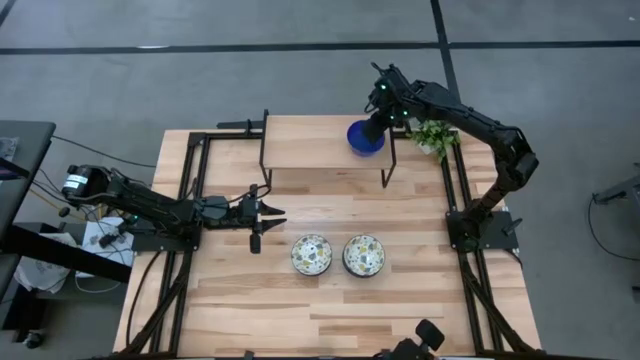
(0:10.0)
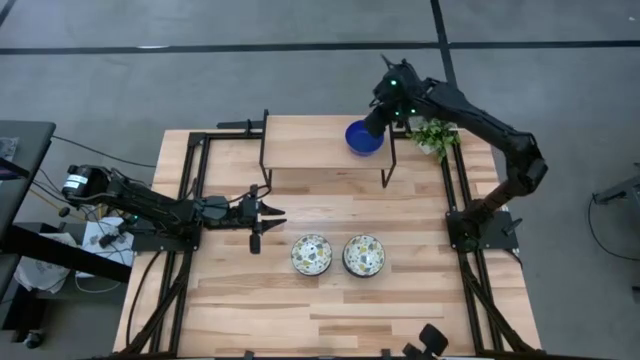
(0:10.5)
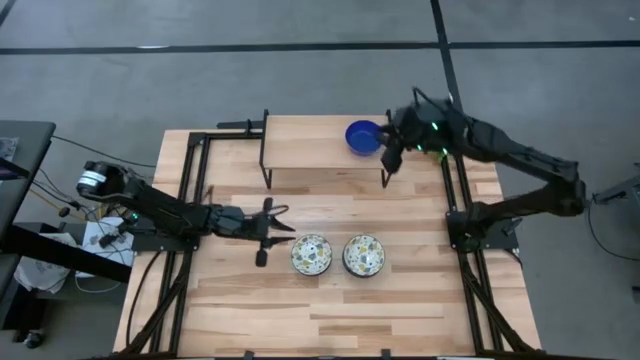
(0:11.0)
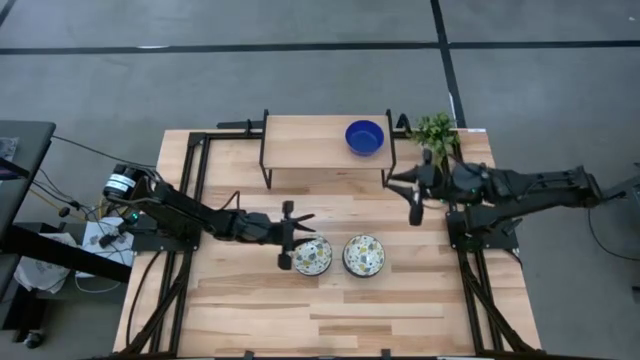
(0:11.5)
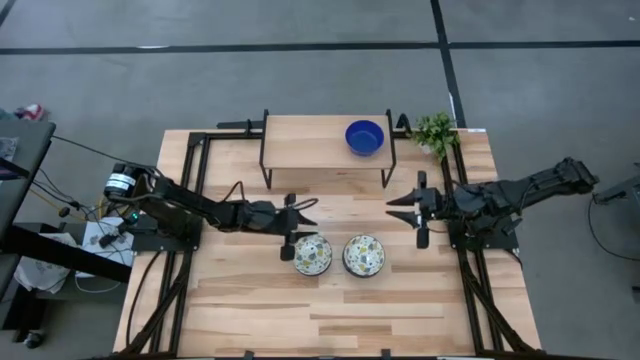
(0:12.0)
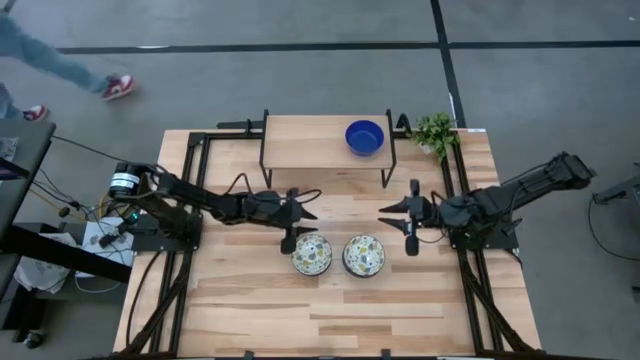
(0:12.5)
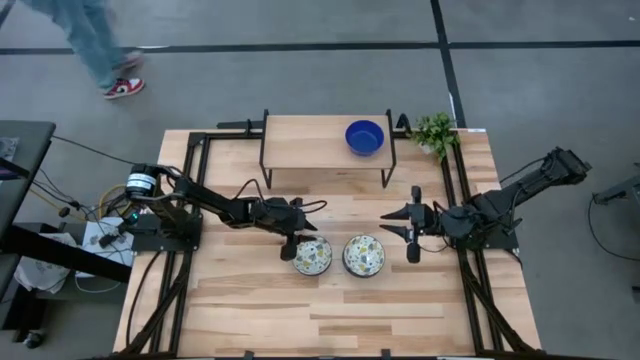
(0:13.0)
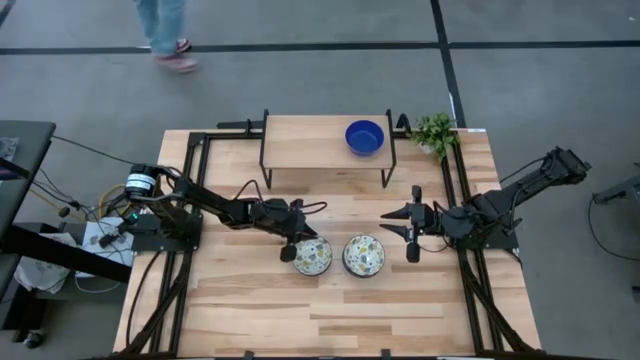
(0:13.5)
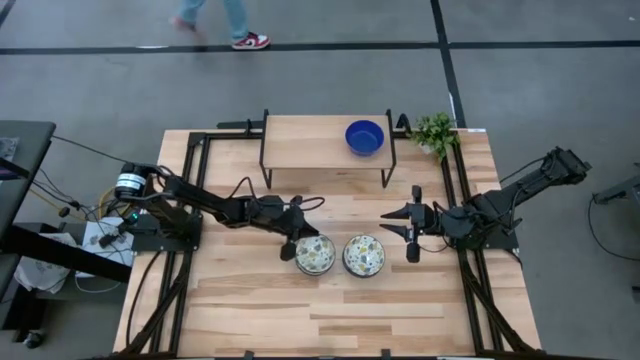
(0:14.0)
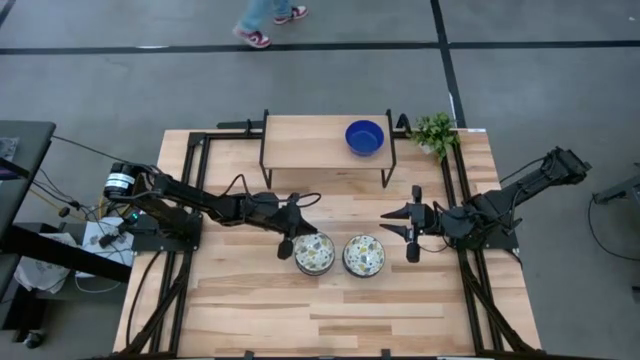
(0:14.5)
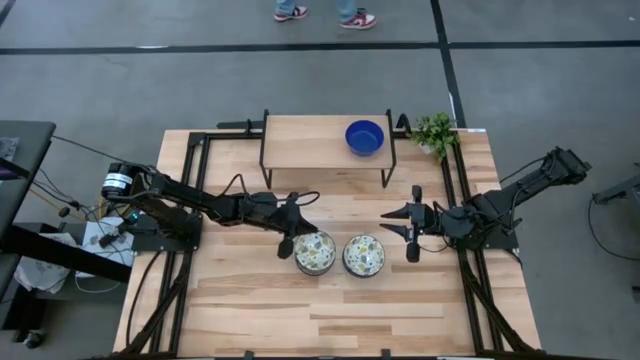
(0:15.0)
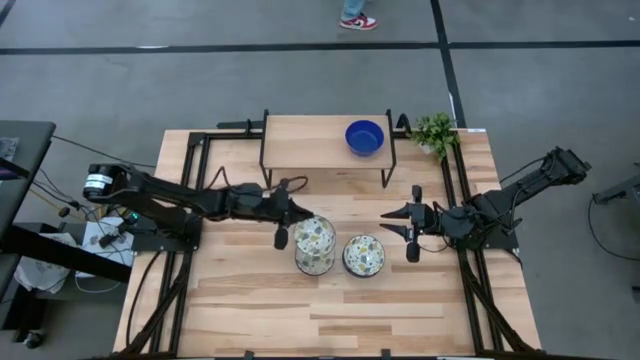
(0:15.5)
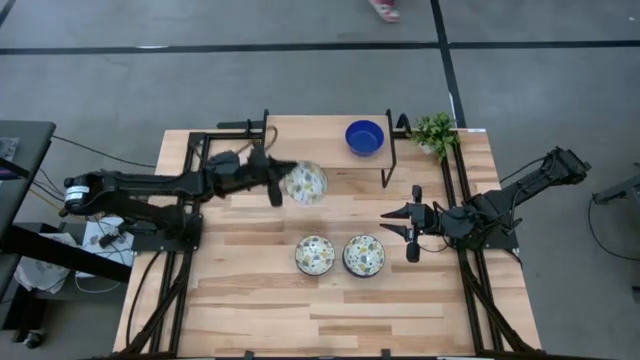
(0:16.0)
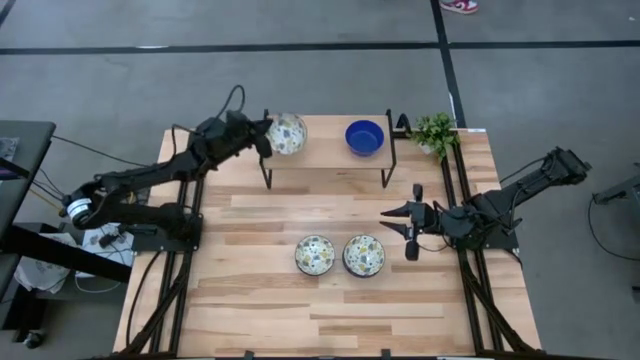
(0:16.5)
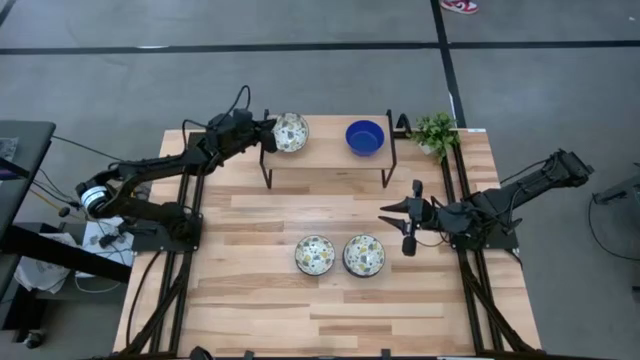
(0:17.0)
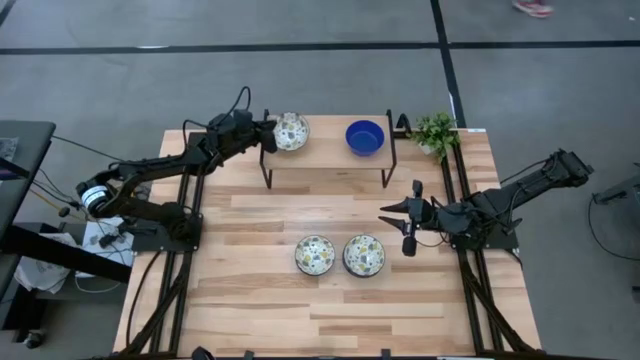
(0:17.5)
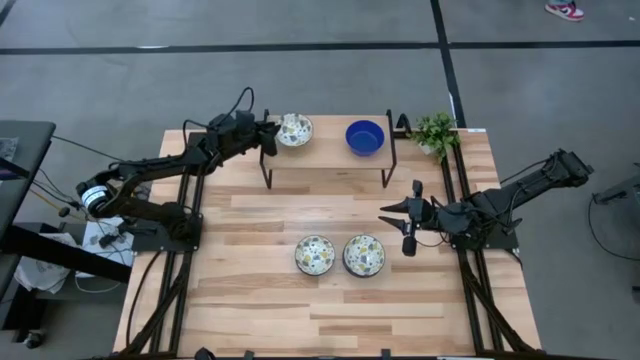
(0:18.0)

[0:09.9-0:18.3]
Task: Pick & Place Mini bowls
Put the white patterned bowl on the shelf

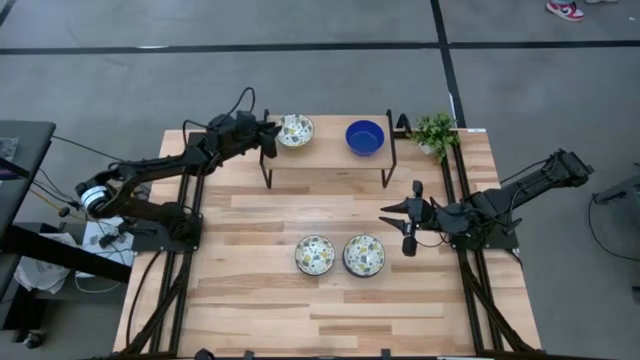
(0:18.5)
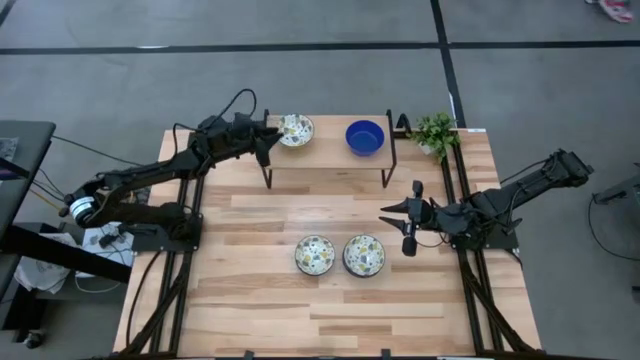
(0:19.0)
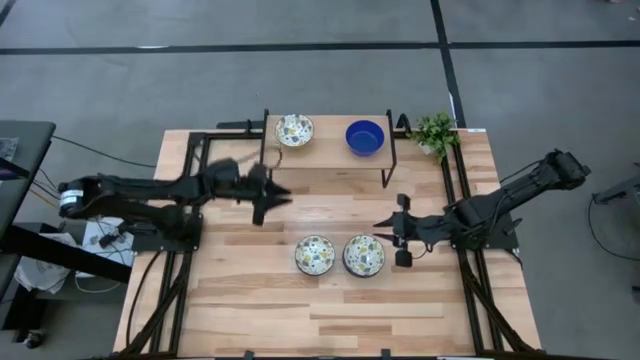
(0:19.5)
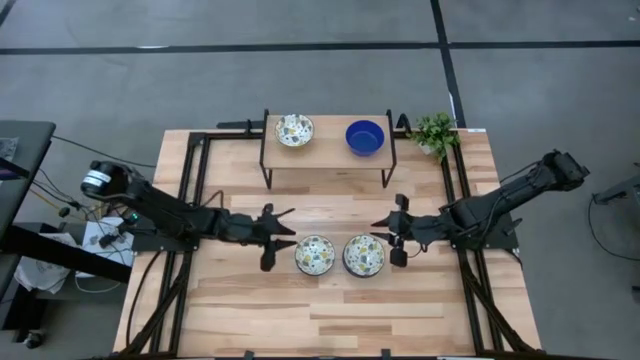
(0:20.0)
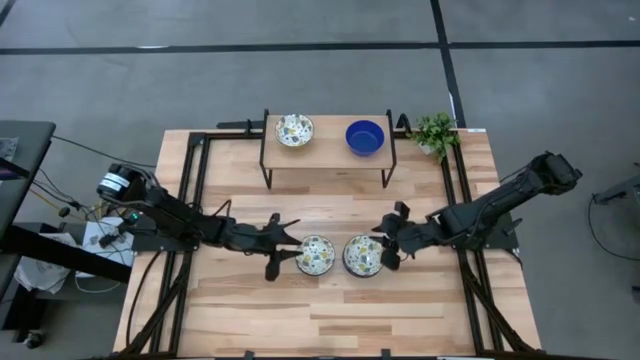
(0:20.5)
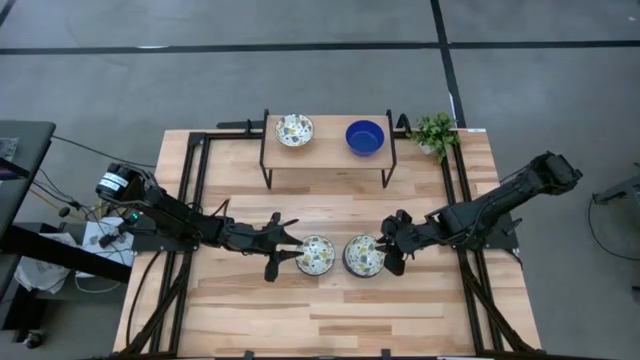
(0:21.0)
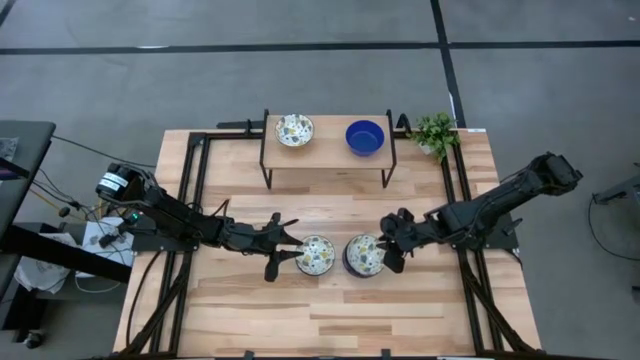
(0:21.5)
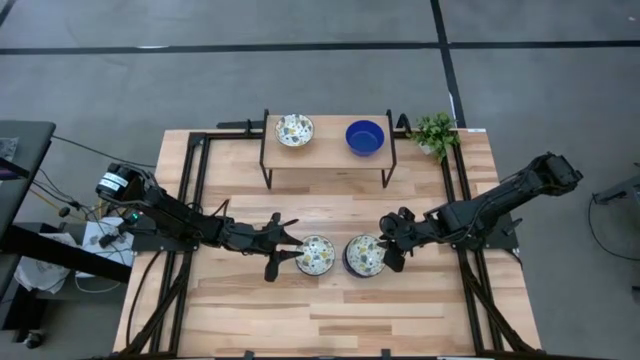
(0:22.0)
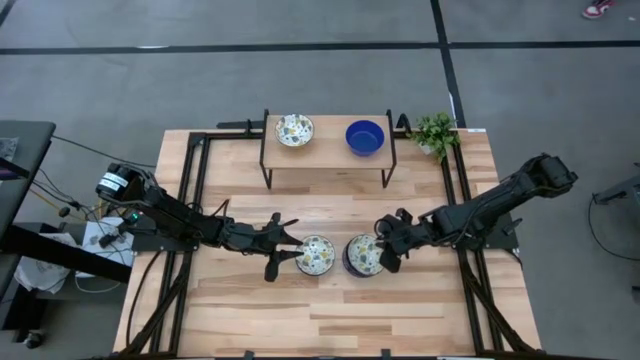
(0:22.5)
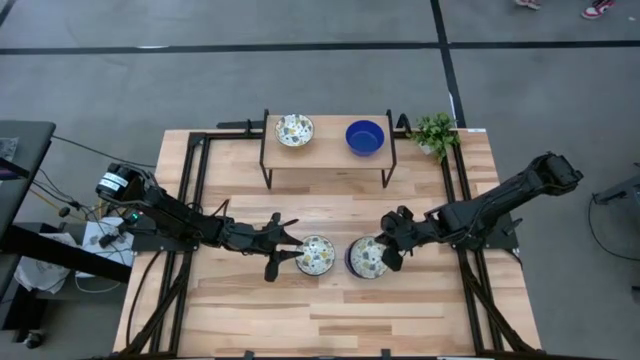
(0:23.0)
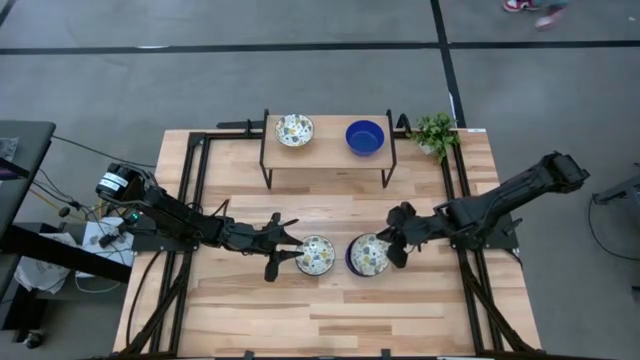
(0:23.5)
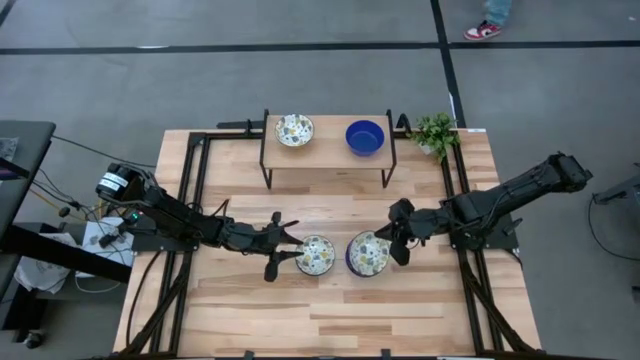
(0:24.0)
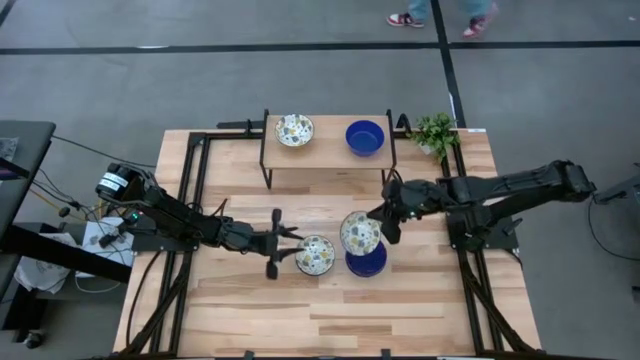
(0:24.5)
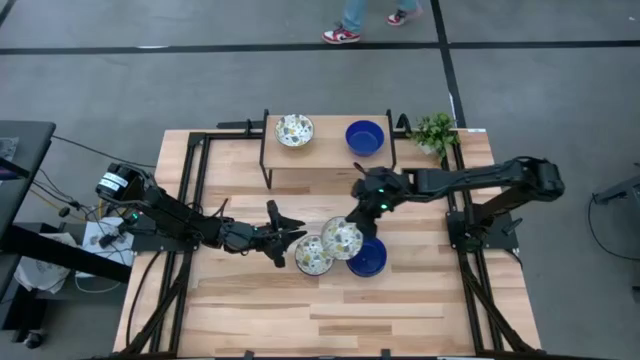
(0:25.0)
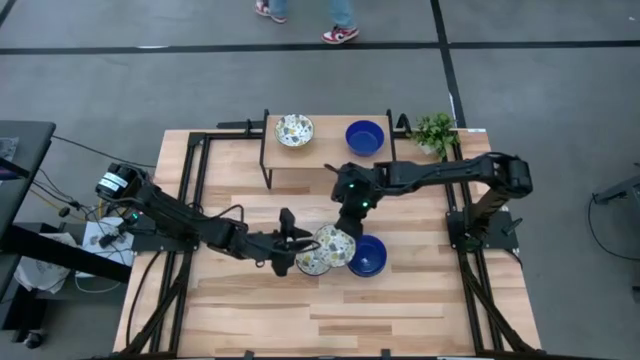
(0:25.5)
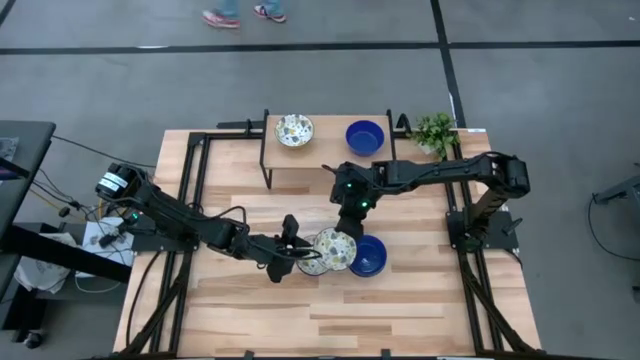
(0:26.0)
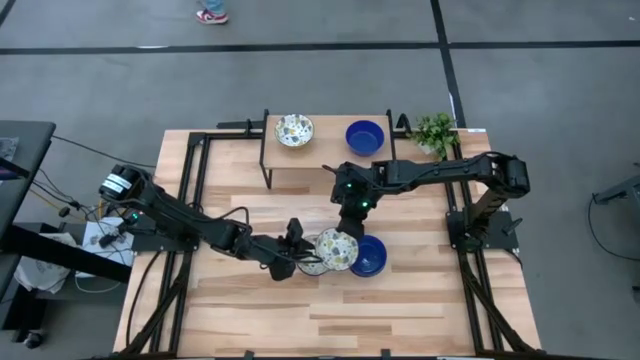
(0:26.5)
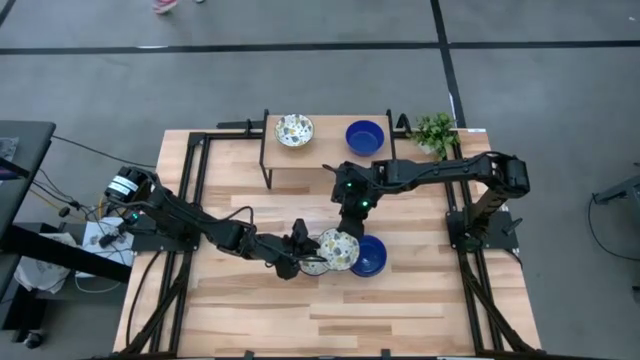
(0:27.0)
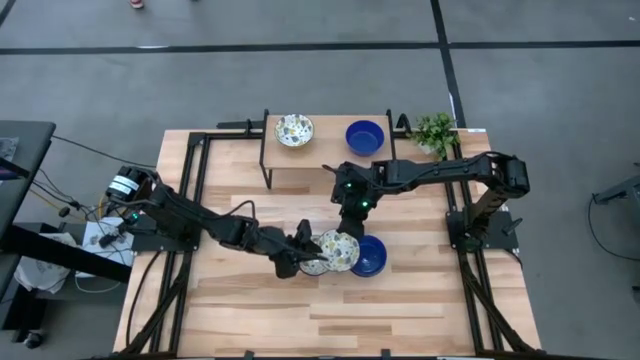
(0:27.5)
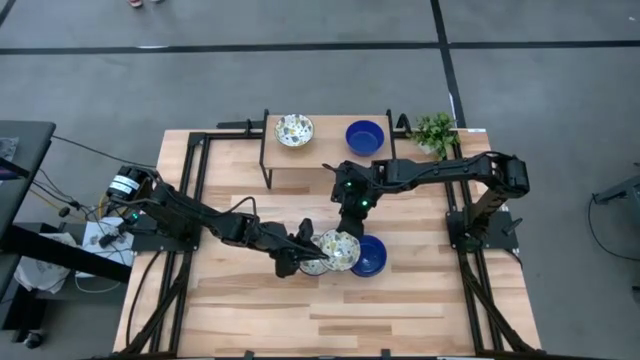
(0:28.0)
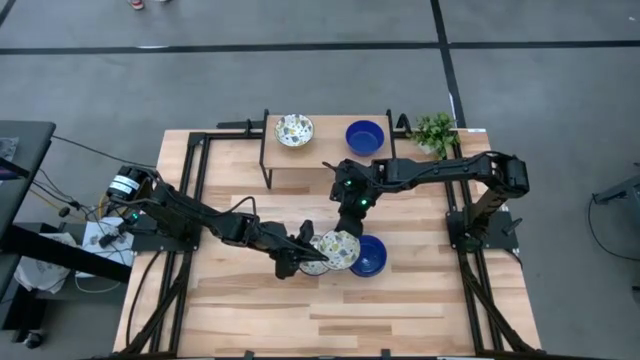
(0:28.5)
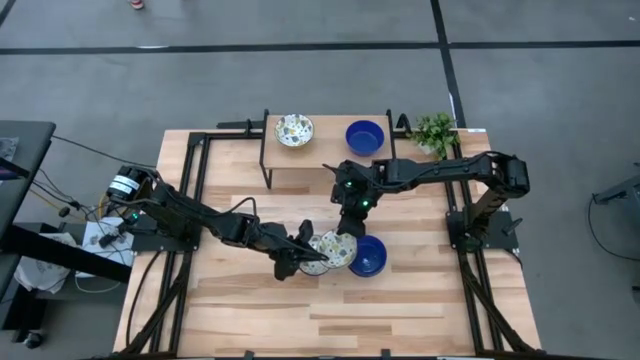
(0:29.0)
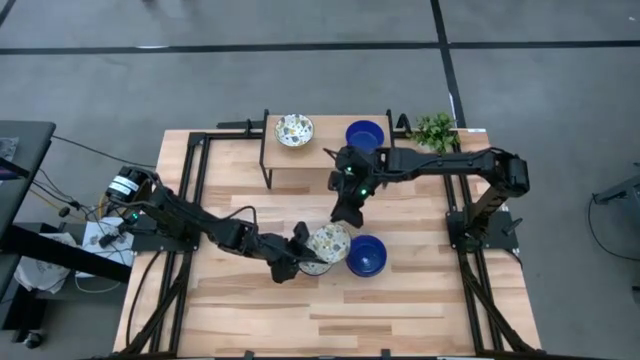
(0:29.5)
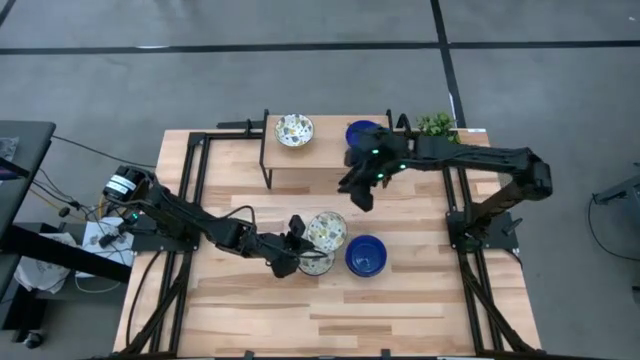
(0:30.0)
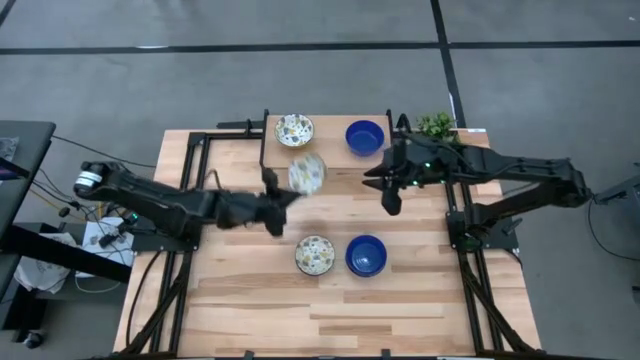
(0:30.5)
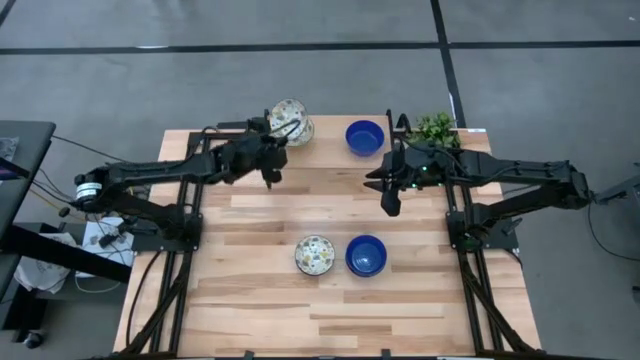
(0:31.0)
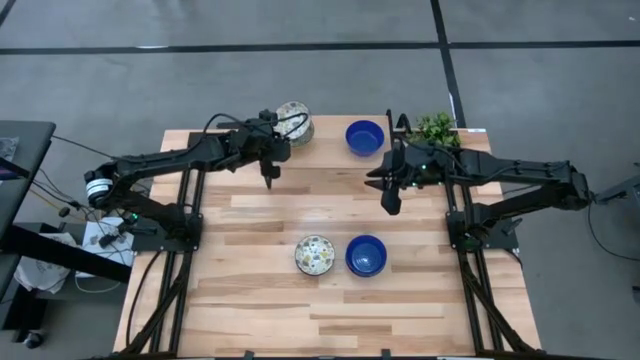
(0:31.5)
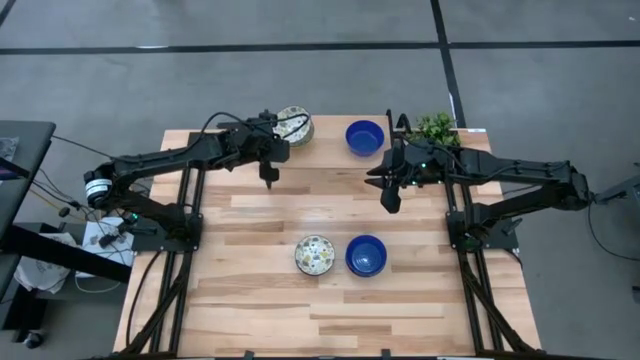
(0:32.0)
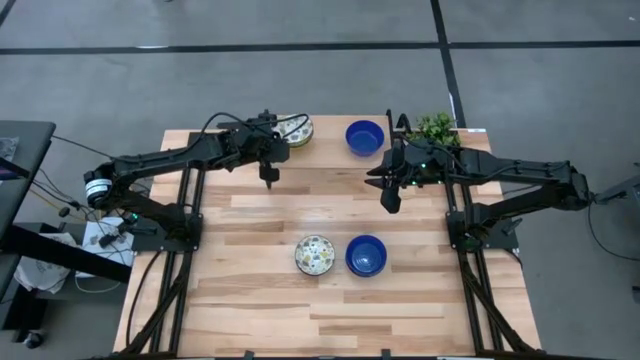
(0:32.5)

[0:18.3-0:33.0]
Stack the white patterned bowl on top of the white patterned bowl on the shelf
